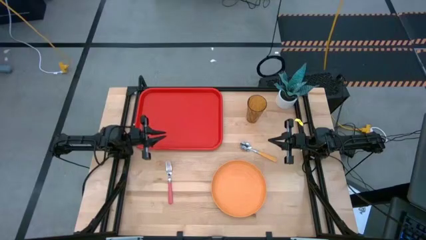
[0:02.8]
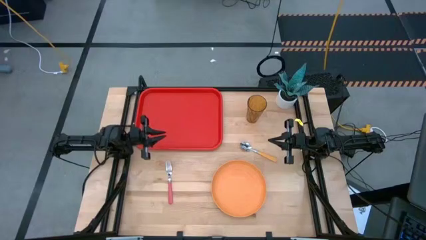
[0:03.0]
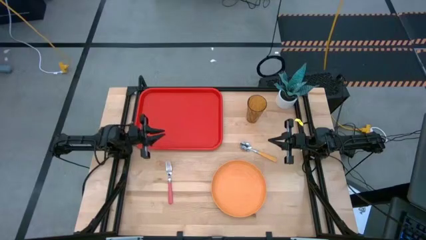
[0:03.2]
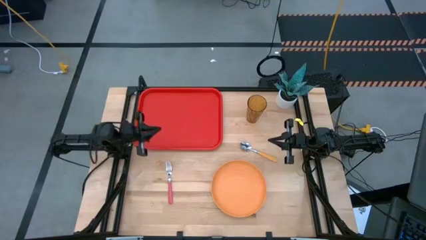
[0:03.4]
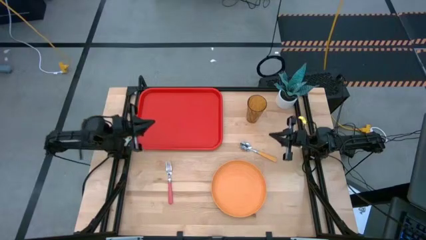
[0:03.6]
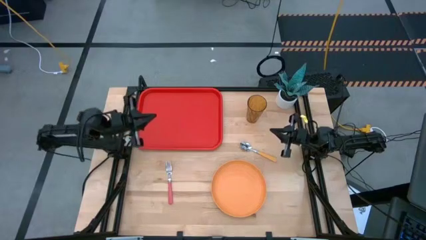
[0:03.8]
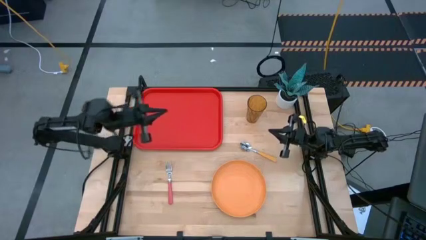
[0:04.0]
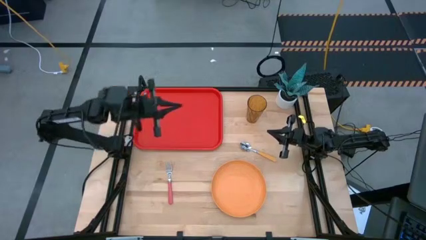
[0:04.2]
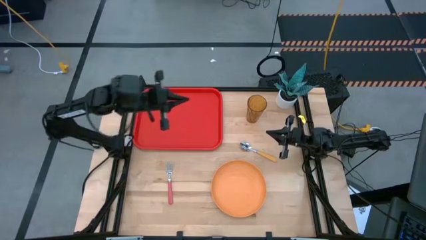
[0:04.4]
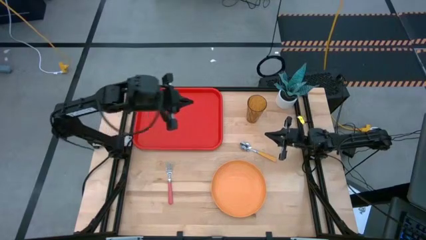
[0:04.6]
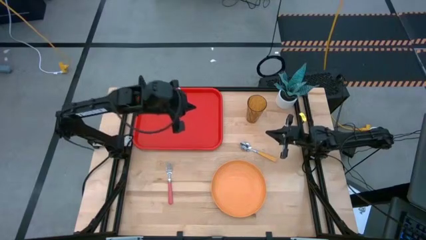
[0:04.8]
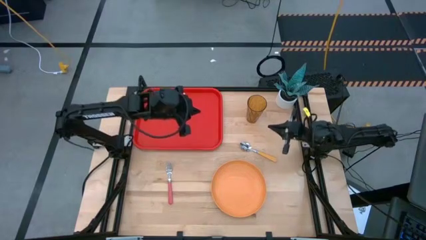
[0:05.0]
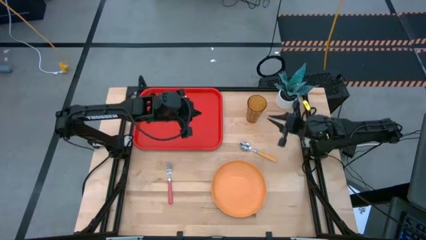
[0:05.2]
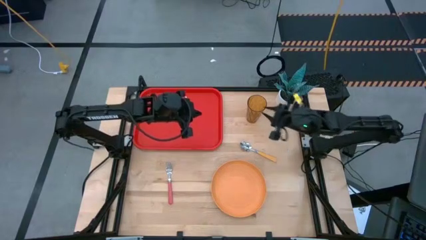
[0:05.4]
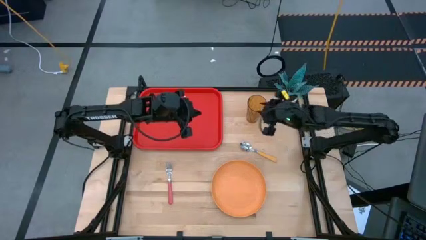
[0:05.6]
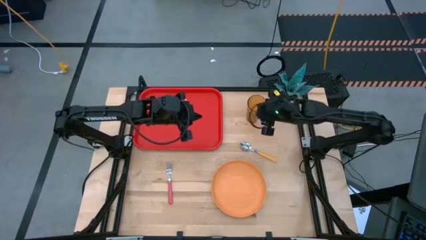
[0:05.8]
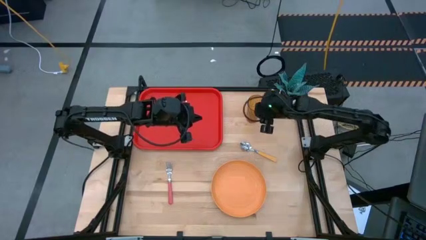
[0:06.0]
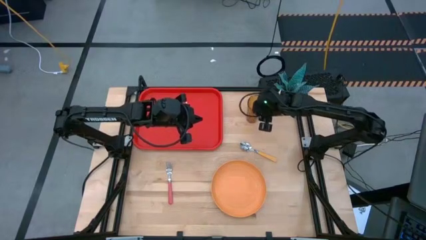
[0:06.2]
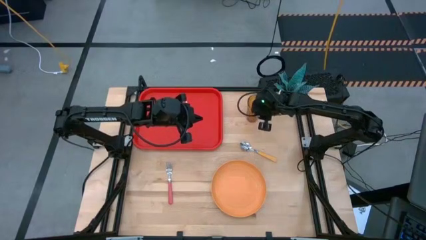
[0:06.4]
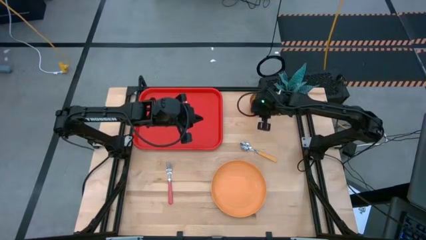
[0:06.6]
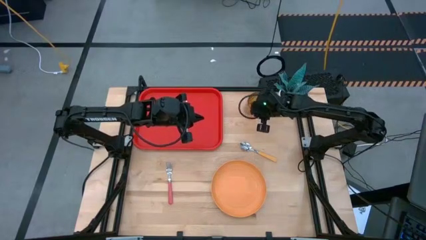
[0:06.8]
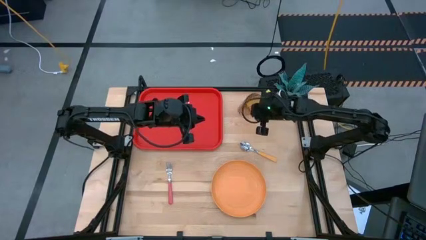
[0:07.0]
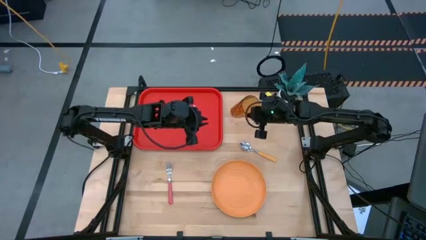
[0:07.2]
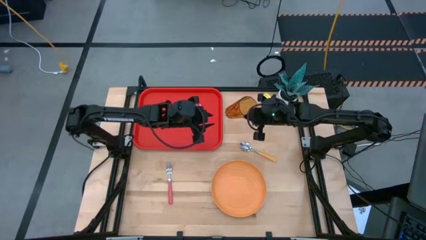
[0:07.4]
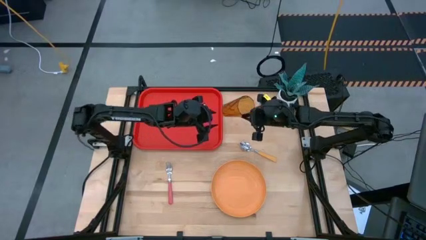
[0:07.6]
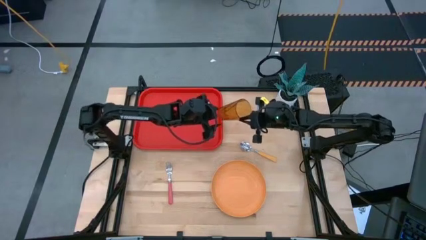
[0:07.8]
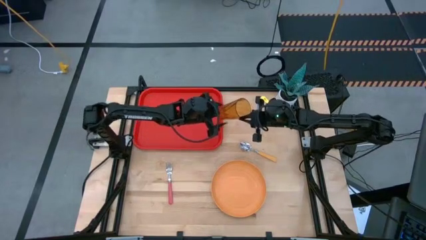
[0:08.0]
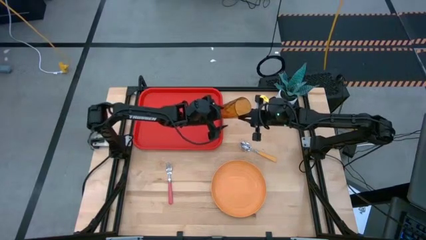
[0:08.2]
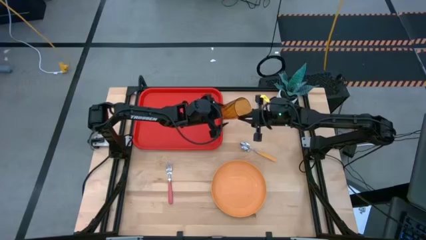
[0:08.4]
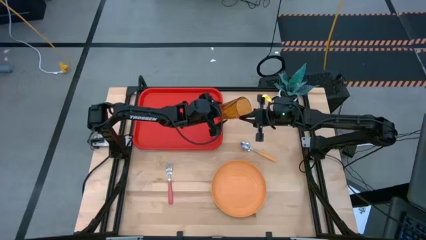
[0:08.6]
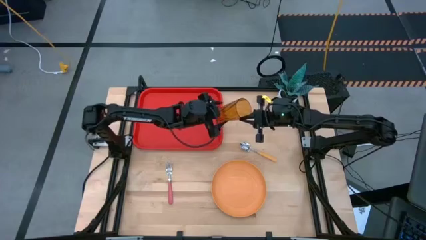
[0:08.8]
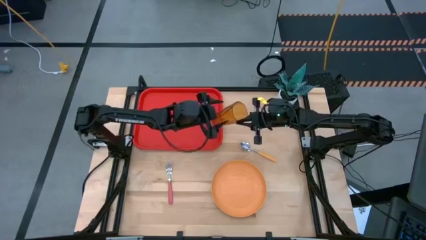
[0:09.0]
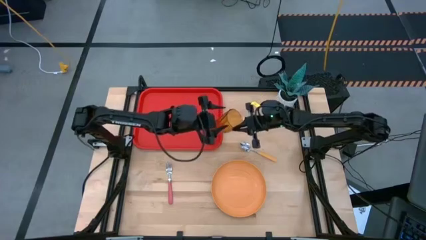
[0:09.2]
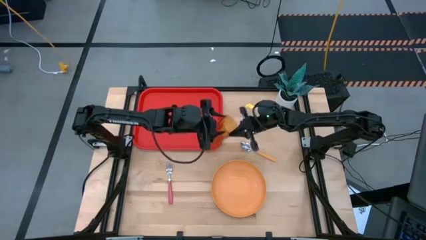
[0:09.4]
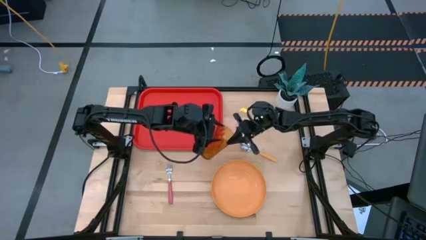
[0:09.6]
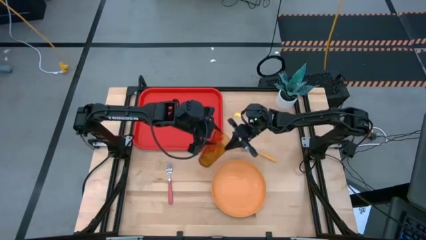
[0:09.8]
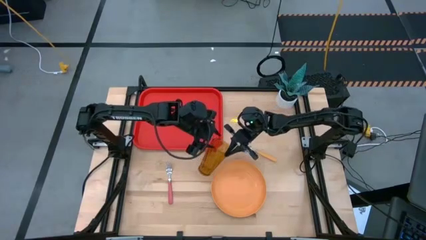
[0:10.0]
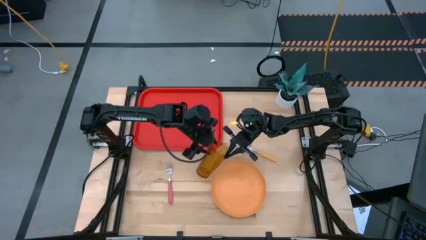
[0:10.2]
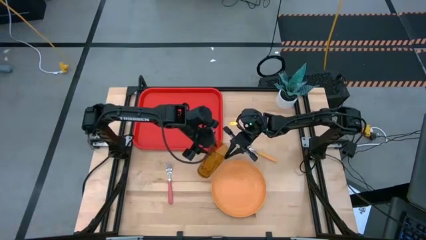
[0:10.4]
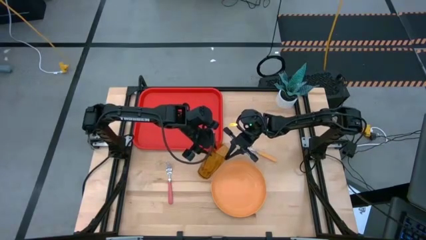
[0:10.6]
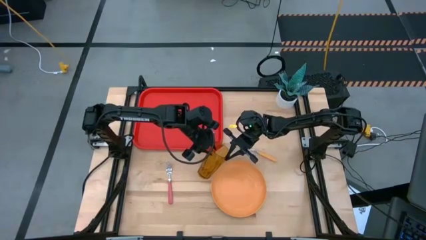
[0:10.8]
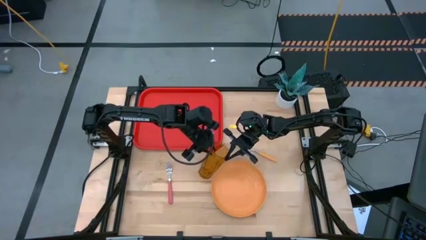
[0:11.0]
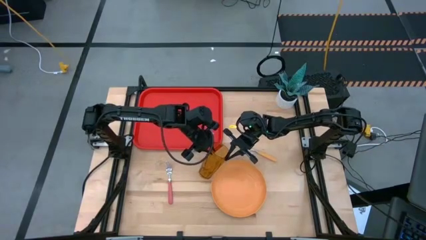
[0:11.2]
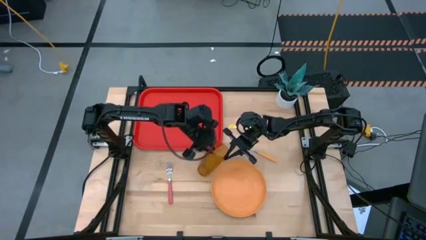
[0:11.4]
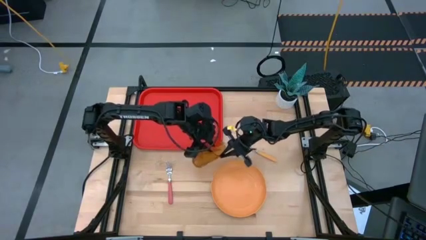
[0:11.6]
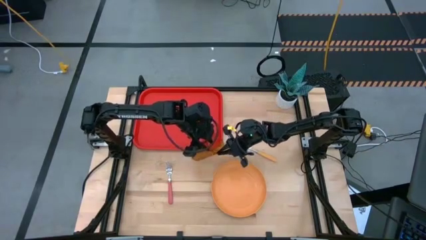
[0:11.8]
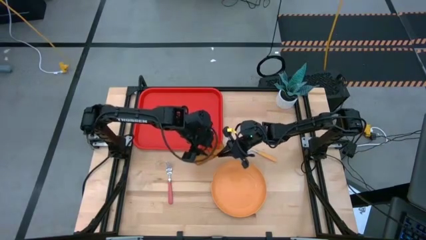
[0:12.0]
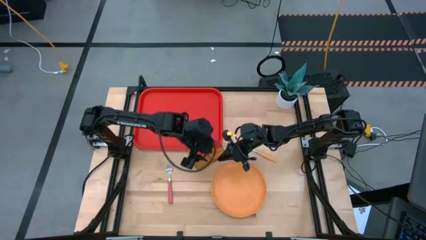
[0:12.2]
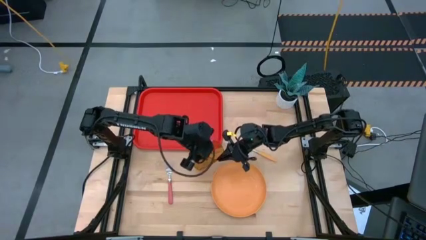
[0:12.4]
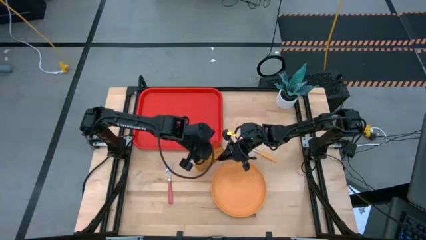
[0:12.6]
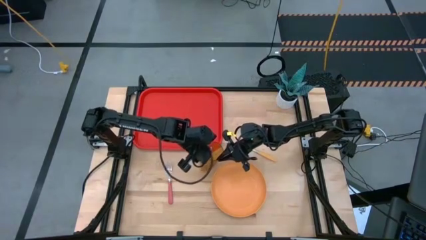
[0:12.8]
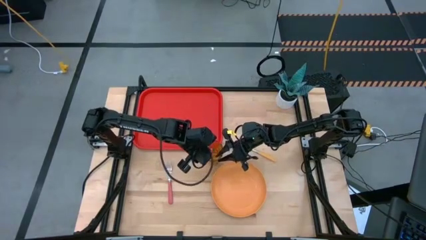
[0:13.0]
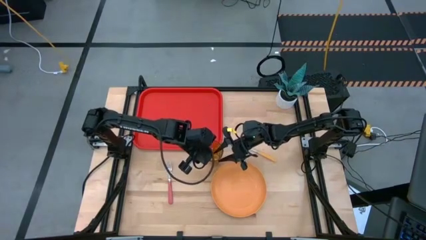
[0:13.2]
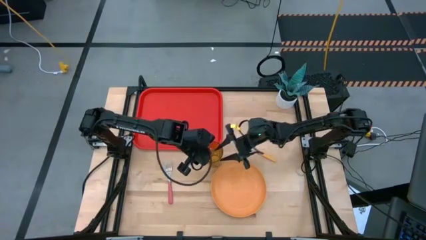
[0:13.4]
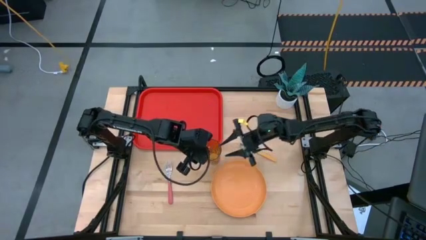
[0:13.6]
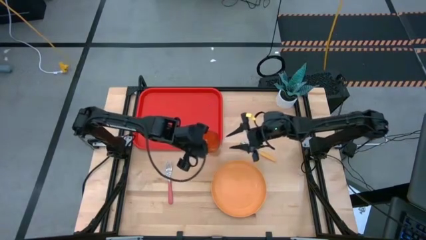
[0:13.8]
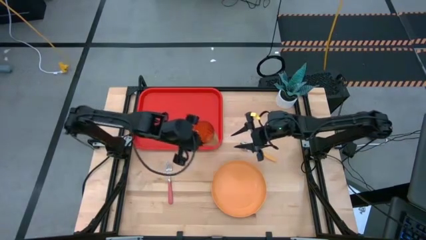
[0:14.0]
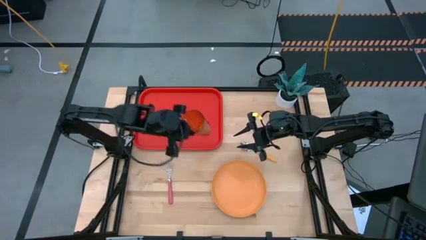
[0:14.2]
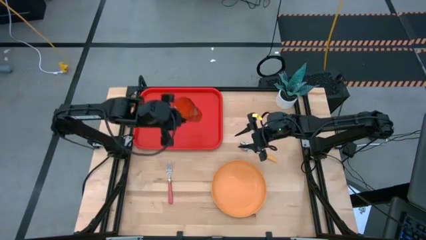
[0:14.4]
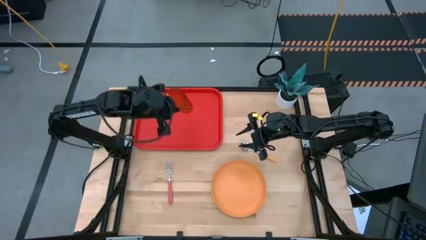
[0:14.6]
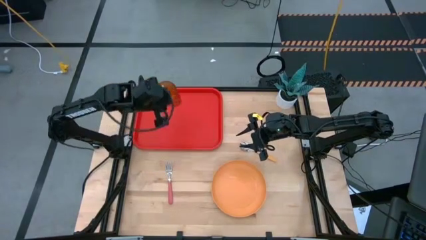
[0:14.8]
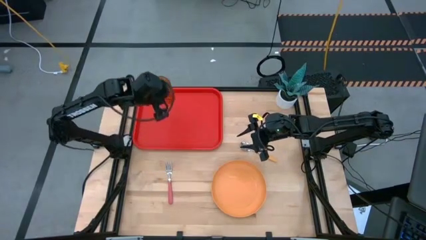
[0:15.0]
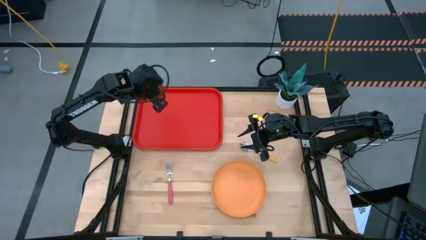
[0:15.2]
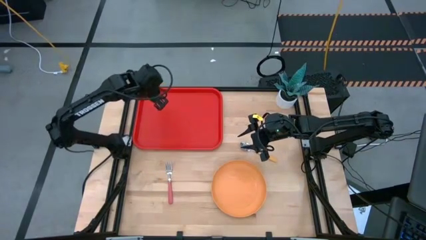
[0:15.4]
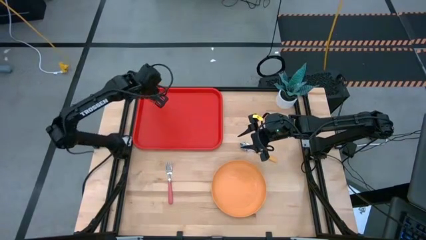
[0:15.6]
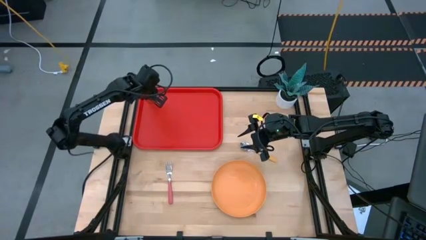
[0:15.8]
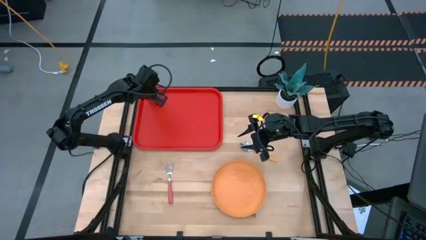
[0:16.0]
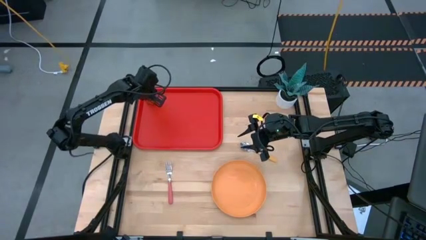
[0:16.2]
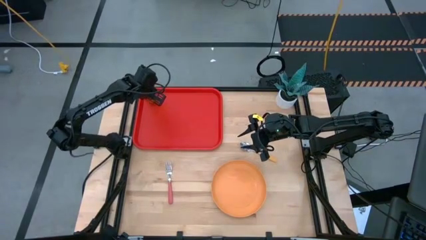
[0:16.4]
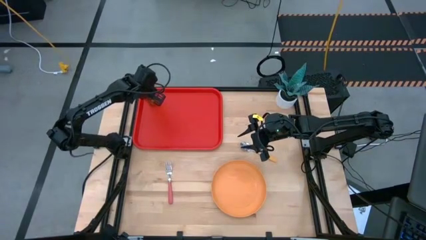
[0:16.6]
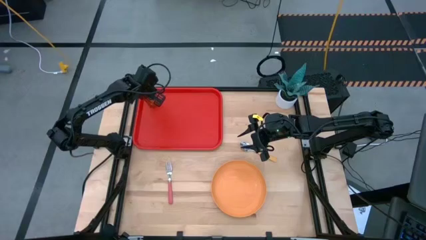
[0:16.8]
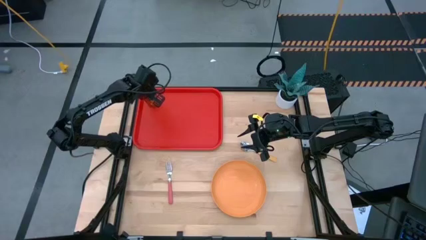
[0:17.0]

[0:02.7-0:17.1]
Task: Pick and place plate/cup/fork/spoon on tray
Put the brown cup on the red tray
